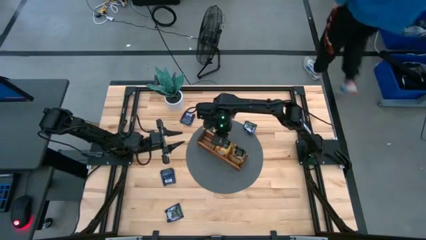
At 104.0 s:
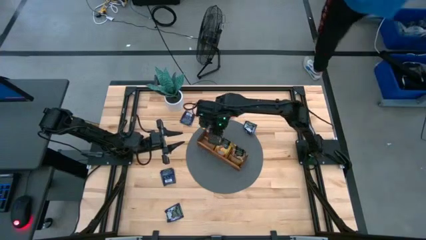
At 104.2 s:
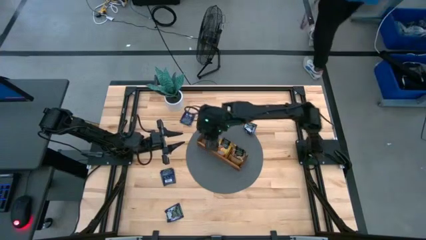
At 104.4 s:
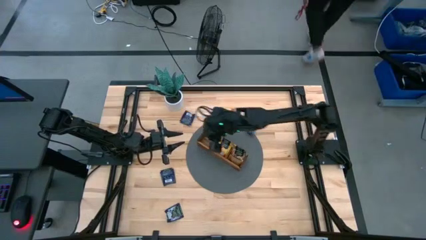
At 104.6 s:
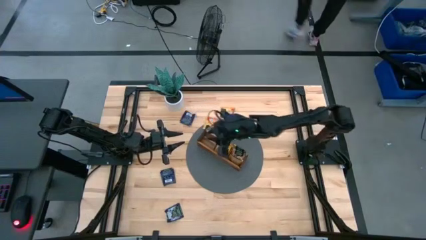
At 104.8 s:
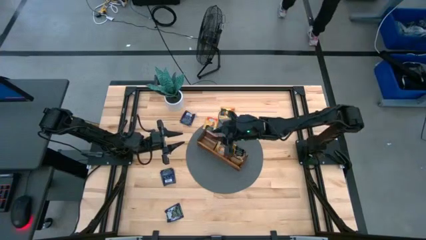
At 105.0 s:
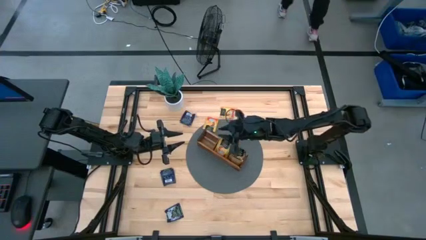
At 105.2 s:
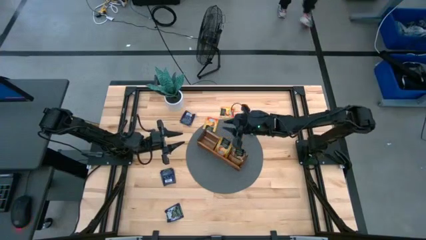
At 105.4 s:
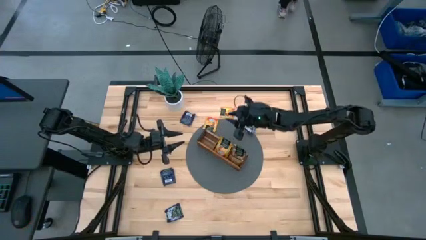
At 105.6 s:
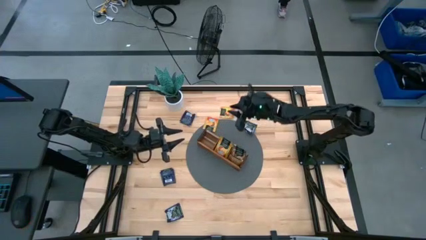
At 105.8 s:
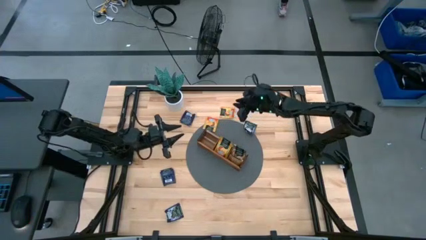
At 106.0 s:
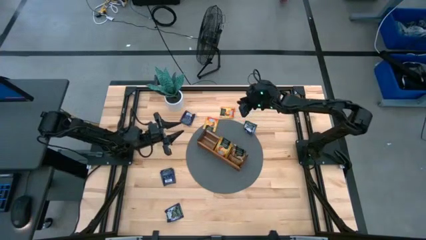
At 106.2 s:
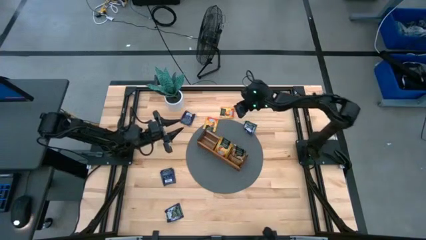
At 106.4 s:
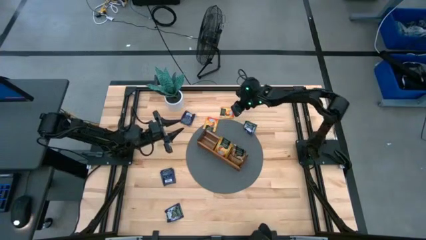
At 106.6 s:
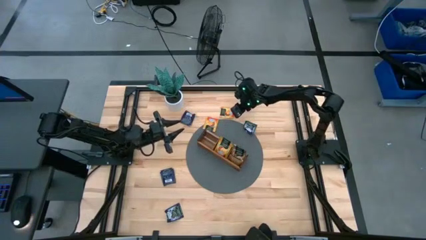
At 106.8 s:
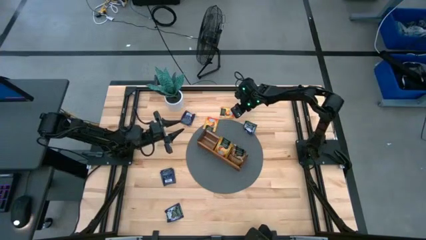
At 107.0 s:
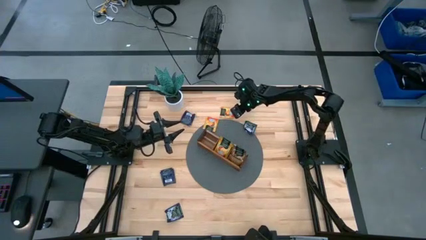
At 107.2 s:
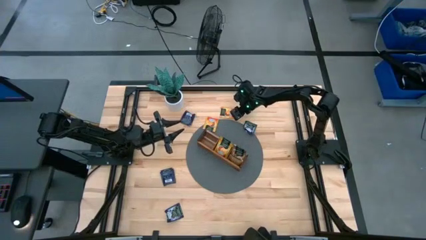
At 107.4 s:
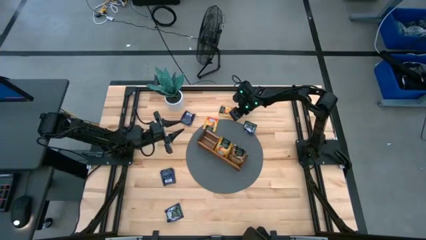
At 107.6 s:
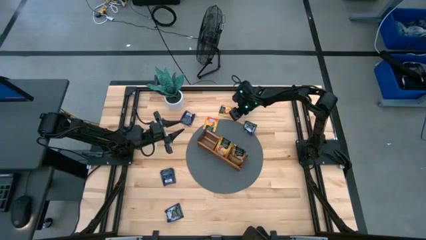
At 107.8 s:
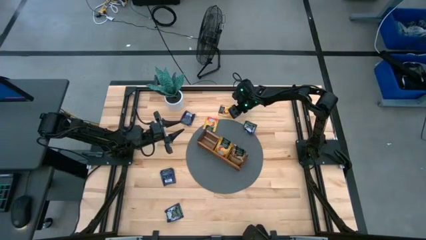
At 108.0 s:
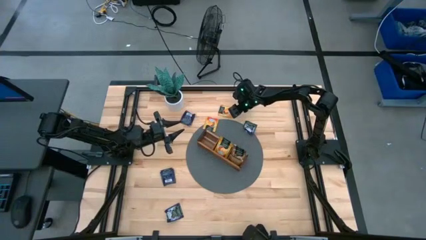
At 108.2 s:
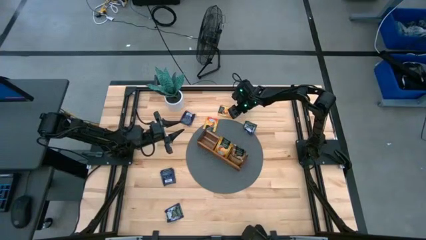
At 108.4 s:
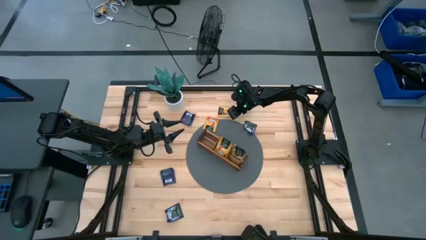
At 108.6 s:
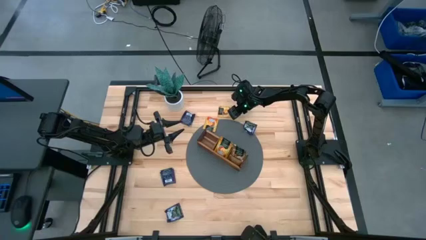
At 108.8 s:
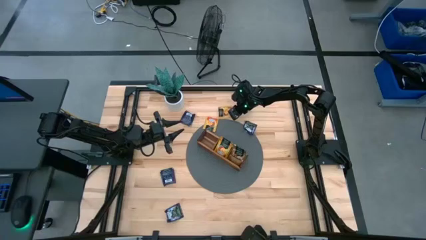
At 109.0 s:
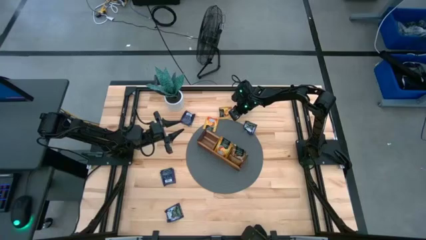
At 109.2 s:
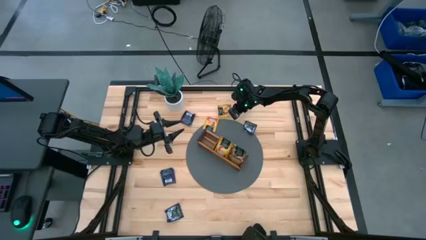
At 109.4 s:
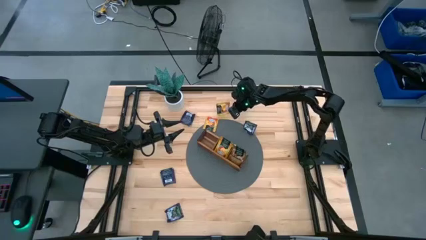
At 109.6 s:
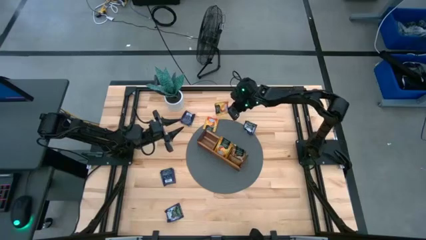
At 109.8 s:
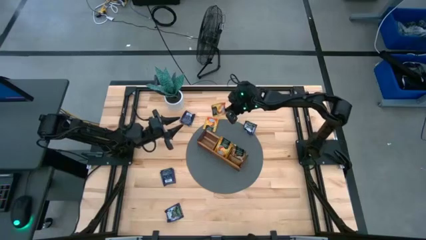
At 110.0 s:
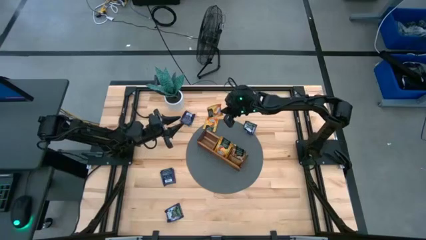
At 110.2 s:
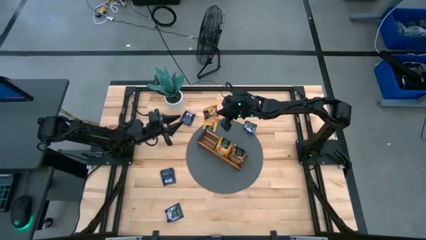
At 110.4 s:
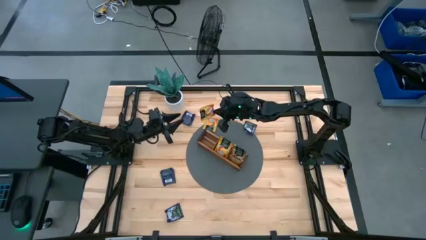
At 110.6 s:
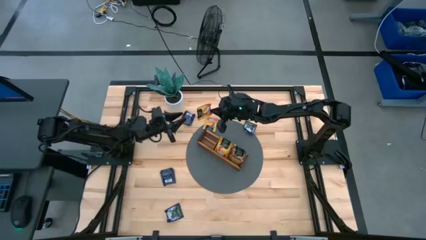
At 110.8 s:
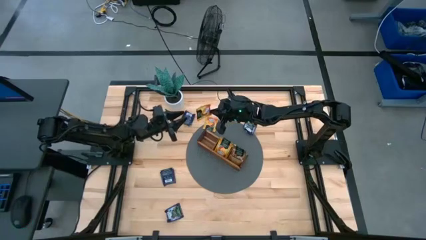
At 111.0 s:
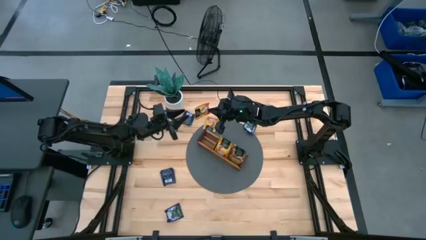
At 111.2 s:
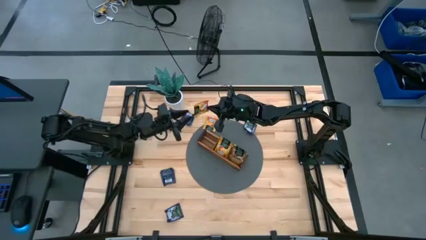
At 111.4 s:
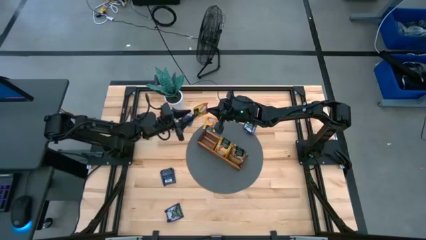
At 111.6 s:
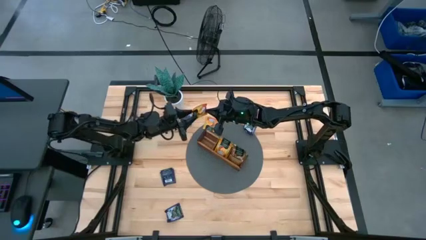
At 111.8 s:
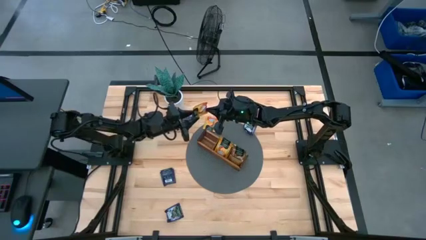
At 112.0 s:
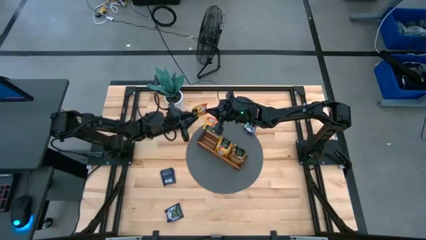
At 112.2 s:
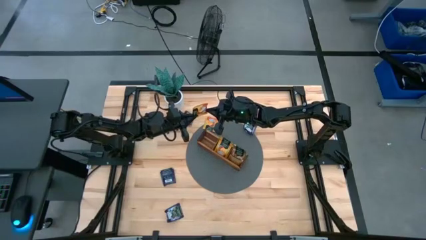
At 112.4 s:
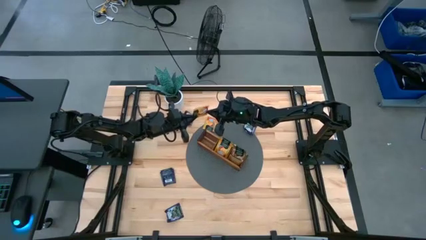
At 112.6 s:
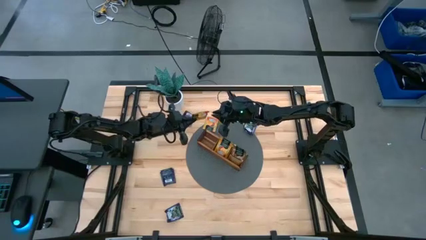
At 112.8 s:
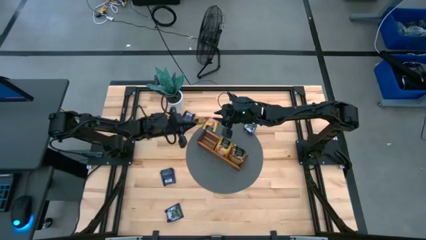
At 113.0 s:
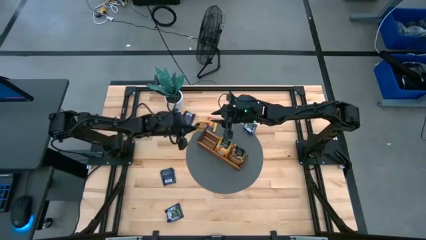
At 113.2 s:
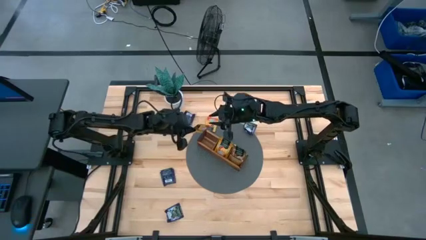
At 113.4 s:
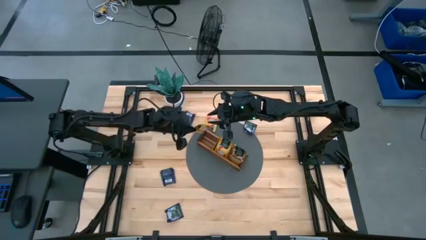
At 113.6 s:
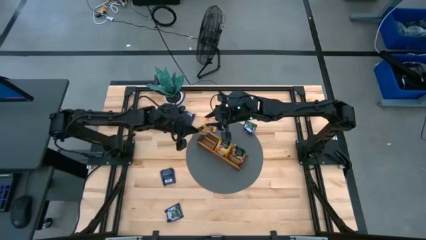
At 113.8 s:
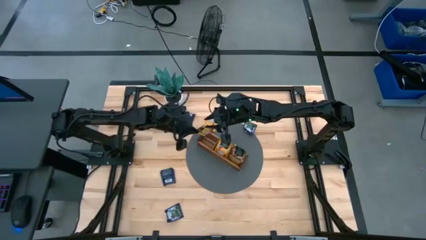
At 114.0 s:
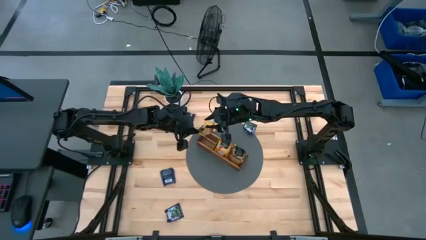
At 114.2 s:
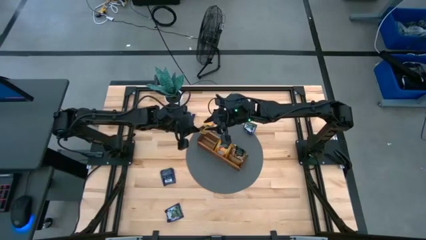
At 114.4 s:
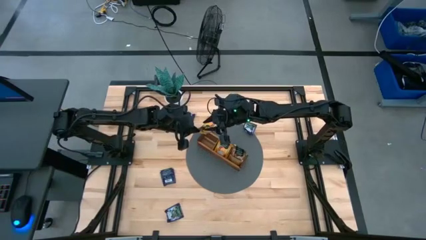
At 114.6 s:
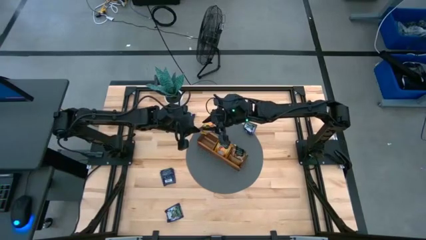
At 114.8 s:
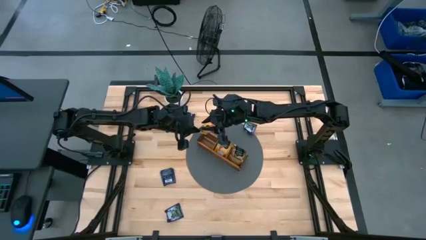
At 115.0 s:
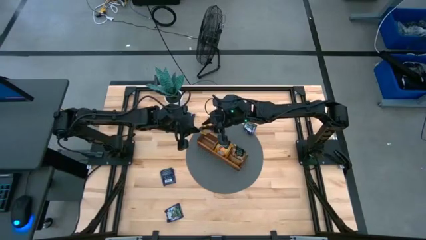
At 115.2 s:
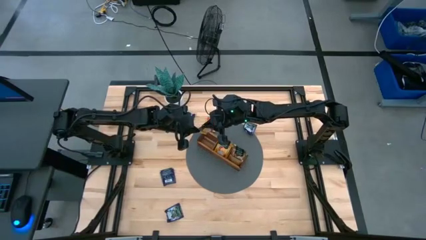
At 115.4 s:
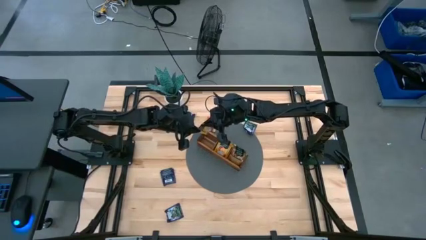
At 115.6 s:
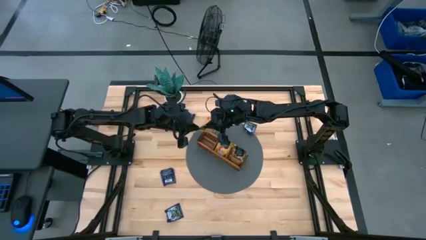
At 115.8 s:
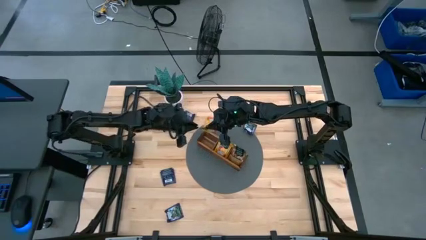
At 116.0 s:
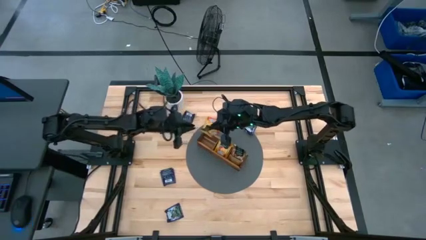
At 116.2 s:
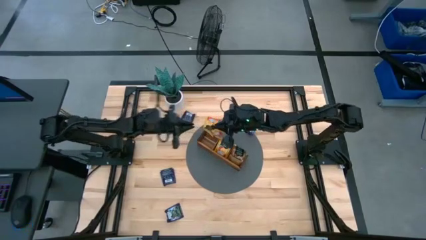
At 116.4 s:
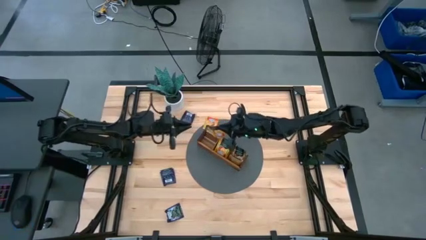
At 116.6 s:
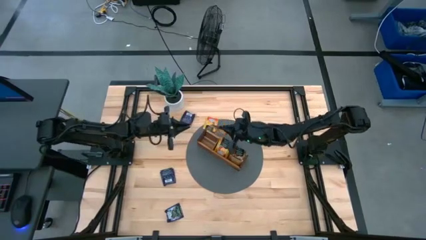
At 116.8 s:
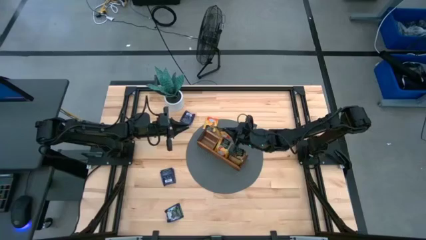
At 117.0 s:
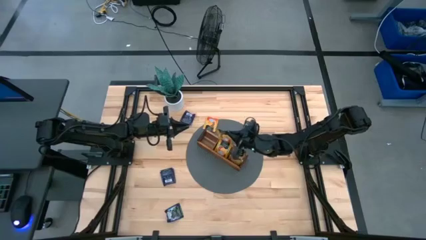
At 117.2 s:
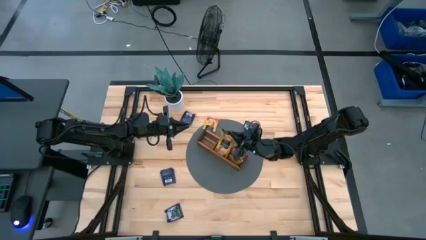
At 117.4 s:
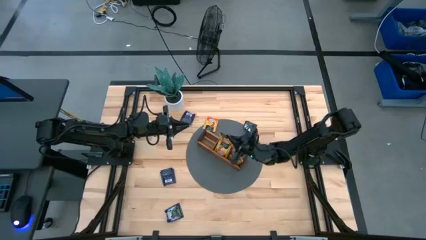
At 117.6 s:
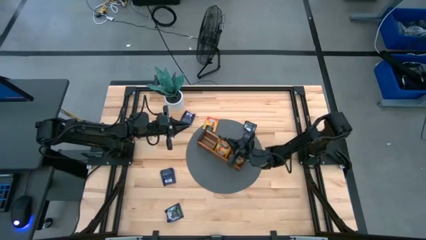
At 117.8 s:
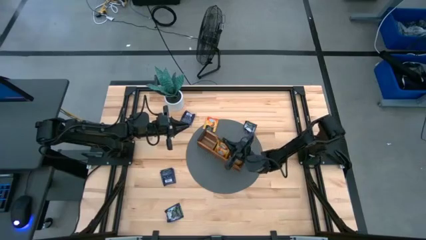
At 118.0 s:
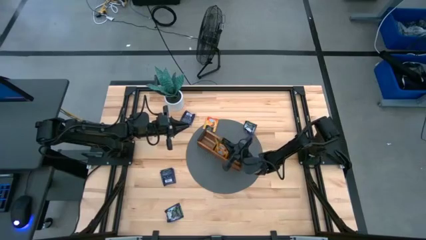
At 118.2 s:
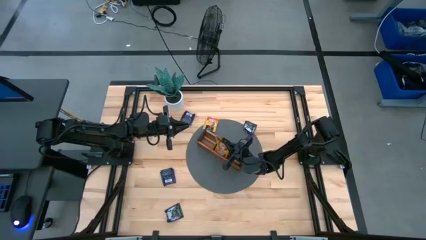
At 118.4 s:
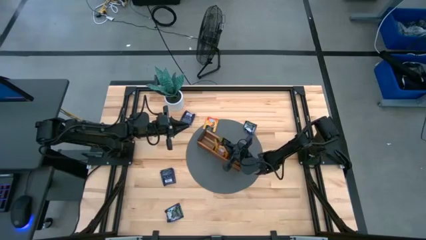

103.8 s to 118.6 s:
Task: Pick & Place Tea
Put the orange tea bag into the middle section of the wooden organizer
